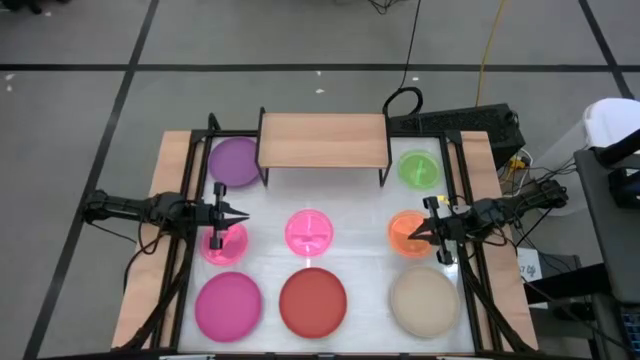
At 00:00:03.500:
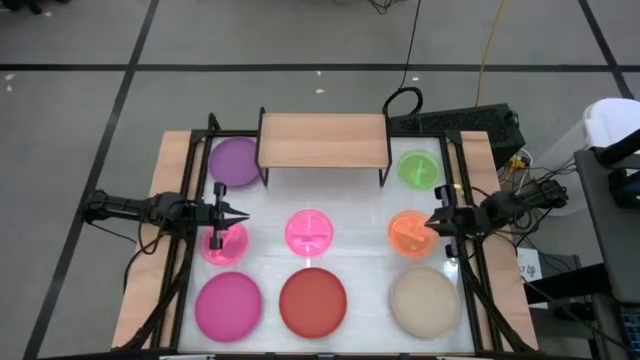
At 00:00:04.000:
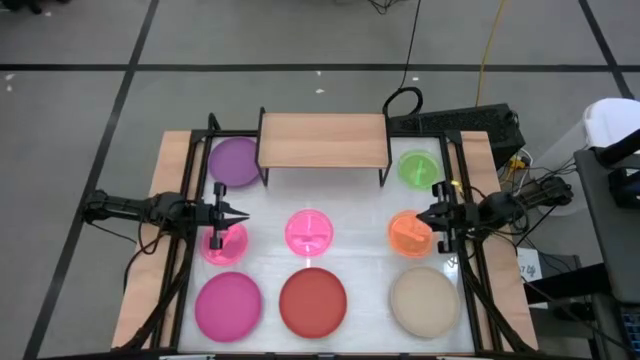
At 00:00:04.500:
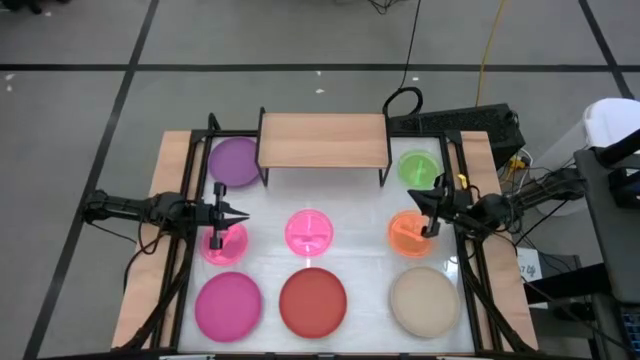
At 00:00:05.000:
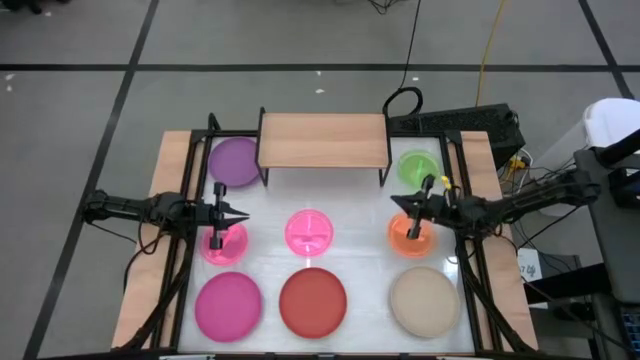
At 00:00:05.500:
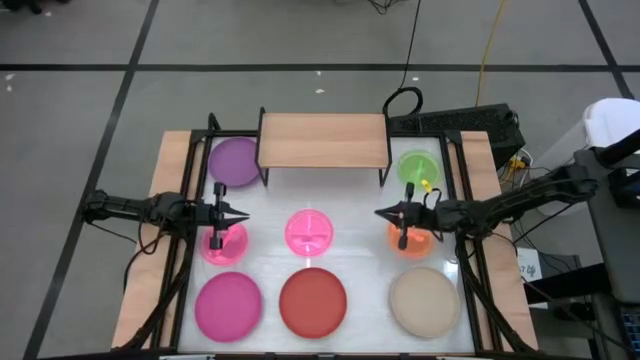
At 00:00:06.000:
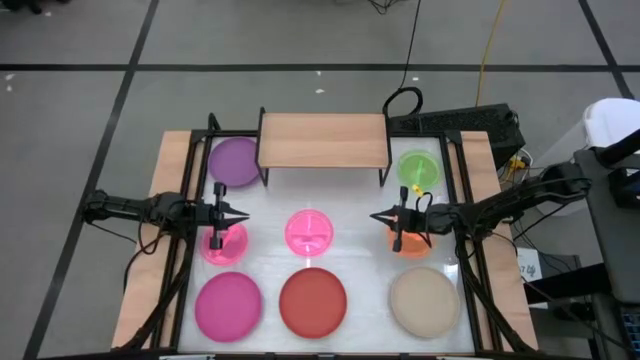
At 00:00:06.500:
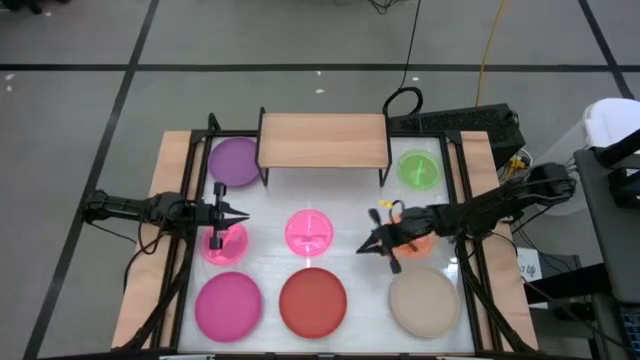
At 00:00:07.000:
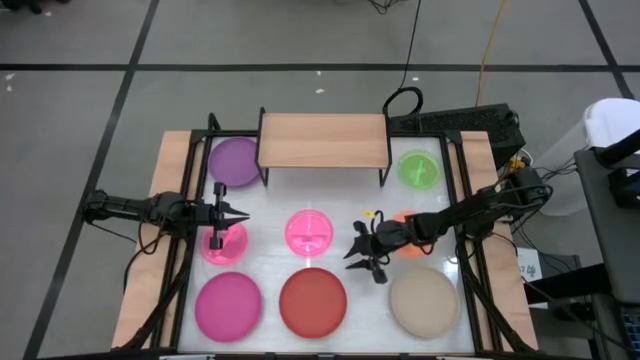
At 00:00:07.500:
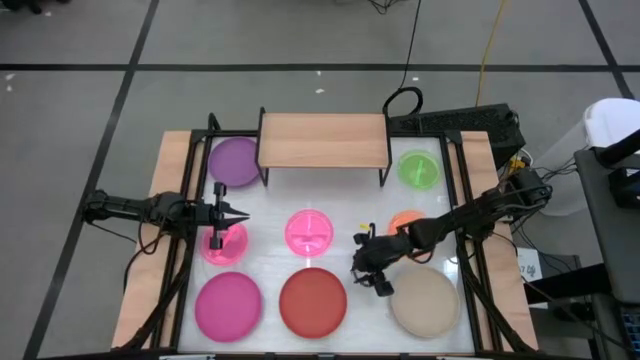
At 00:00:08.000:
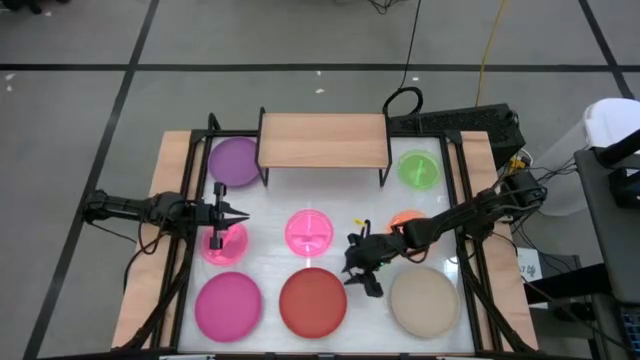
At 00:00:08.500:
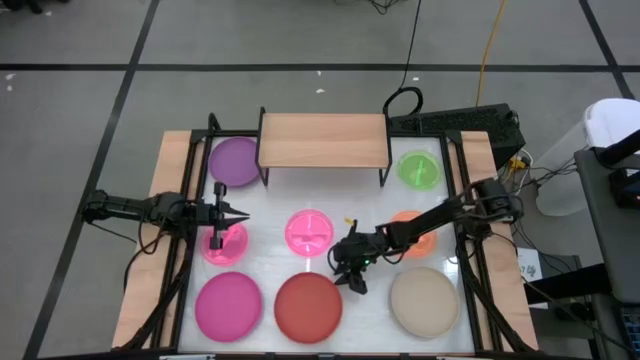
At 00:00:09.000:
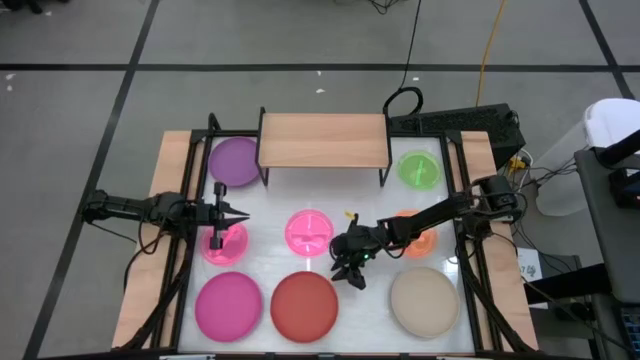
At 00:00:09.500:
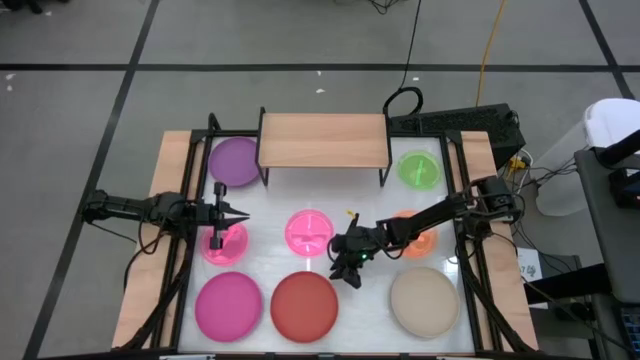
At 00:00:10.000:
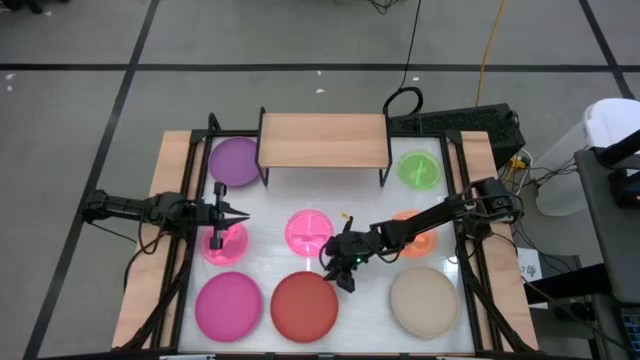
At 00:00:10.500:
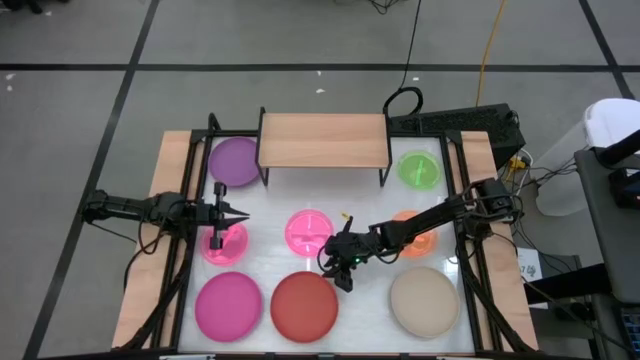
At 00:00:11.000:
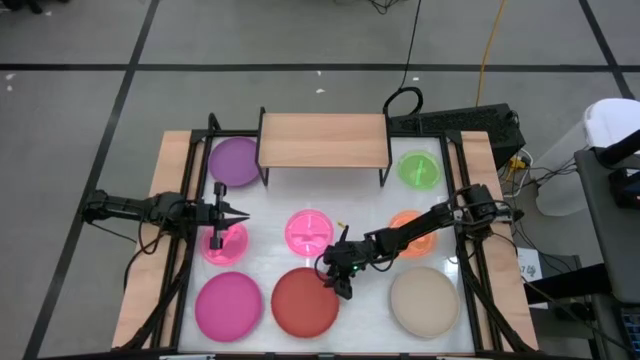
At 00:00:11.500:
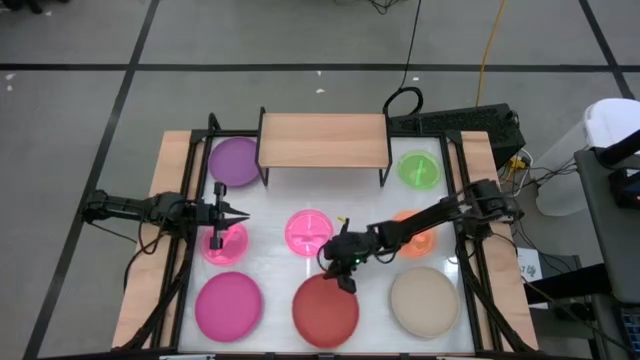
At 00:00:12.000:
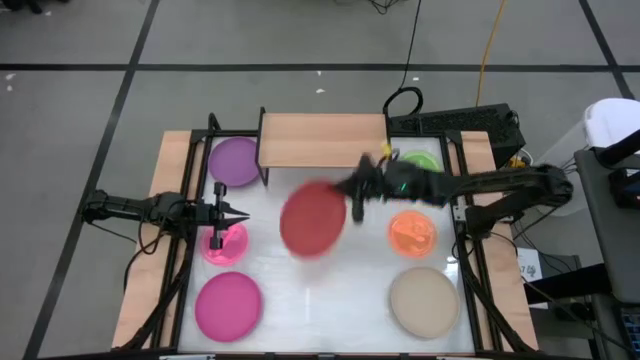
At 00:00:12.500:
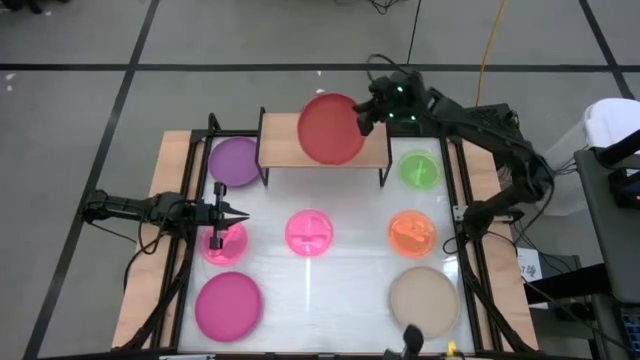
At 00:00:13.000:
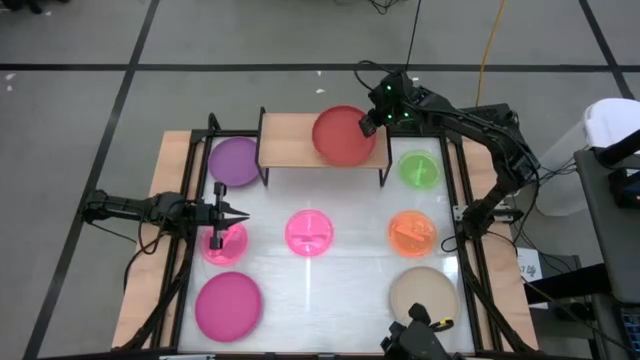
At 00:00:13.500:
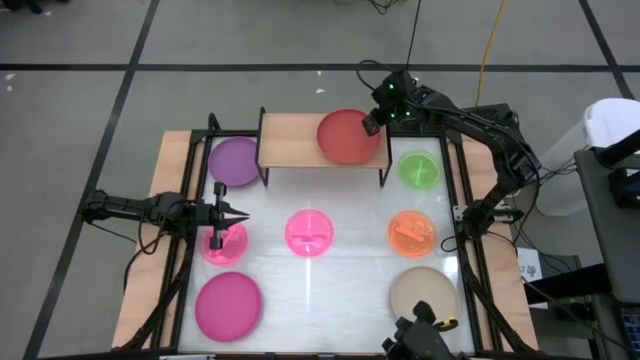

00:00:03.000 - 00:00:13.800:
Task: Place and stack plates onto a shelf
Put the orange plate on the shelf

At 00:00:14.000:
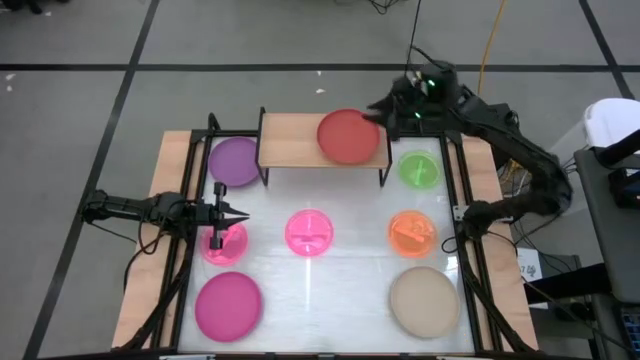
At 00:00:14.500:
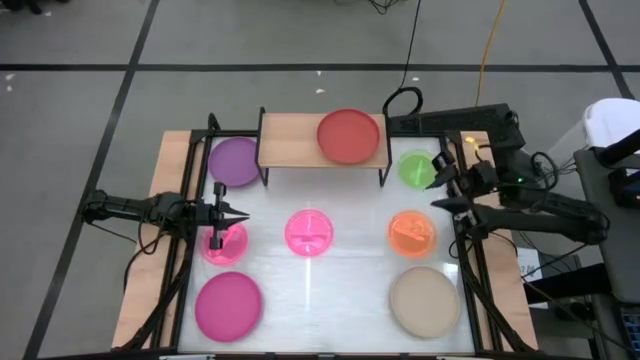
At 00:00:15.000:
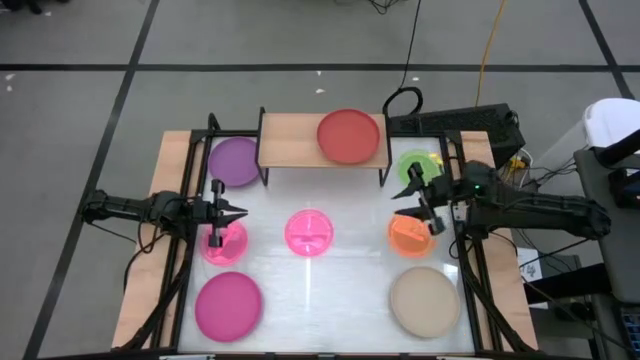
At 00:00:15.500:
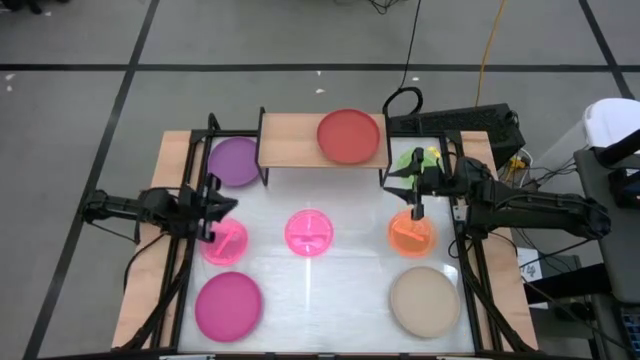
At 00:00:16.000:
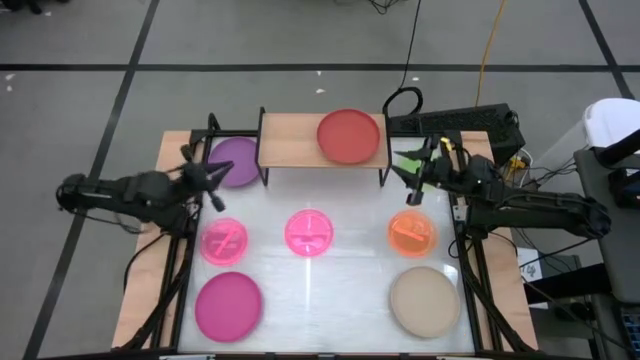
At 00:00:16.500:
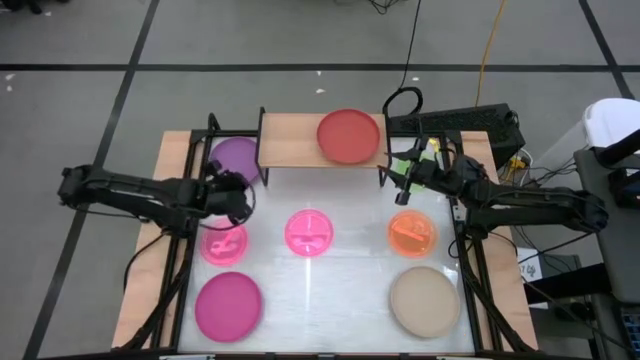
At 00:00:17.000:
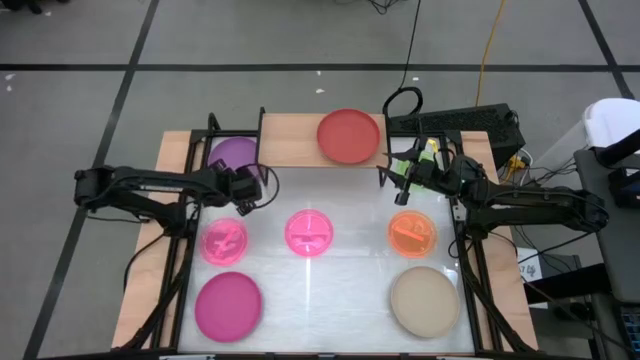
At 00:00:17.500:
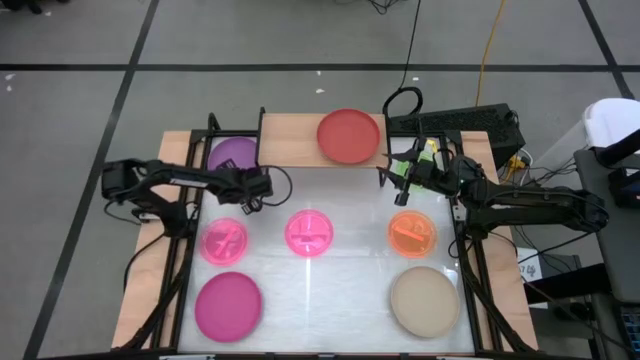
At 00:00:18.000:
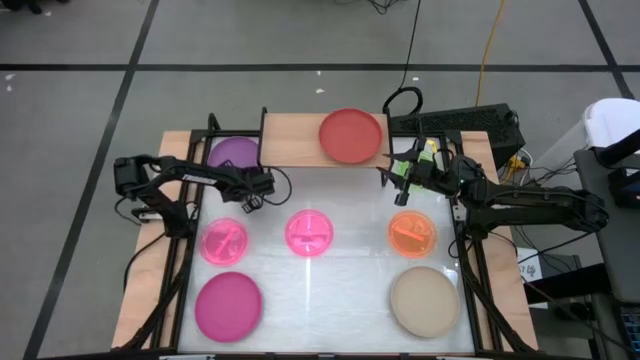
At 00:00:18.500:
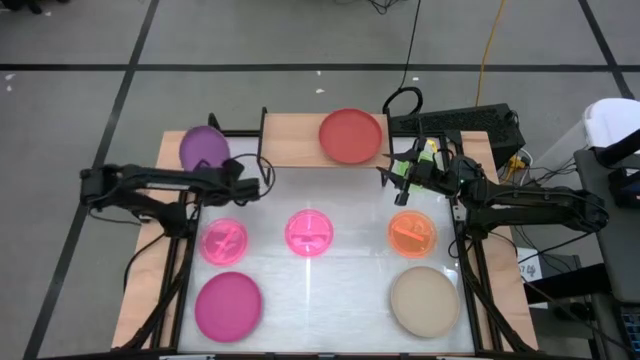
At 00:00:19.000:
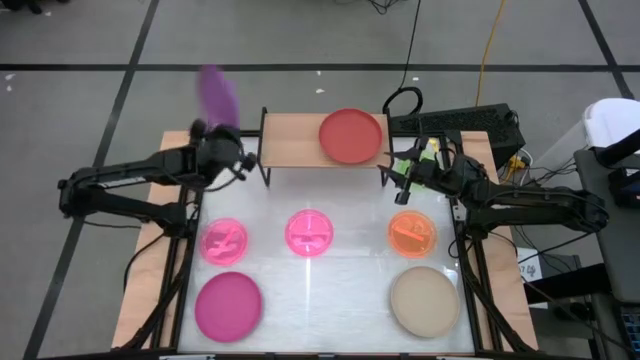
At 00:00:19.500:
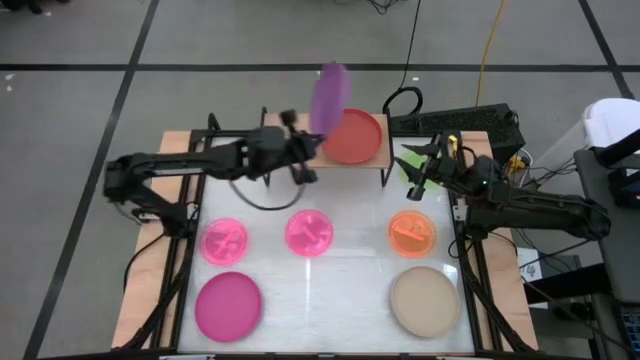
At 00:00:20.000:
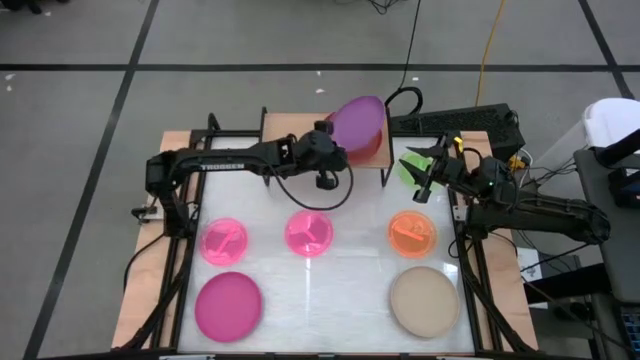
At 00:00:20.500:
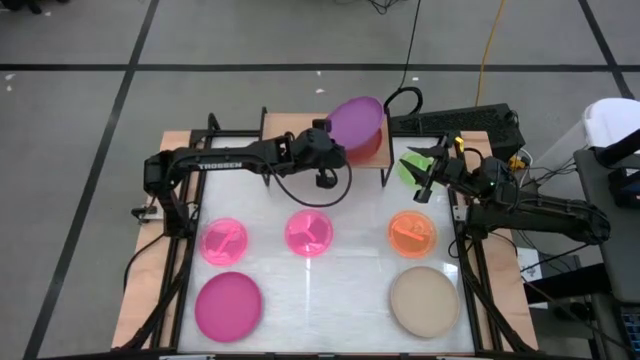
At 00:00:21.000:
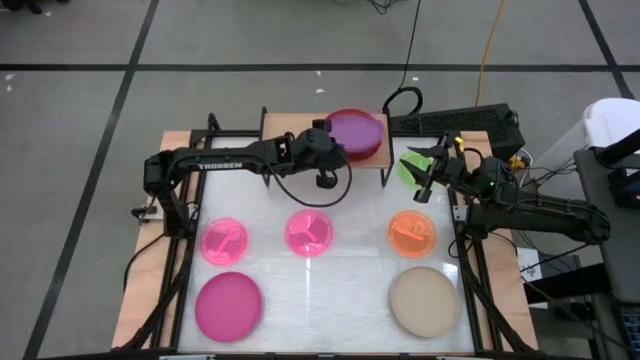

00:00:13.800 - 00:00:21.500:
Stack the violet plate on top of the orange plate on the shelf

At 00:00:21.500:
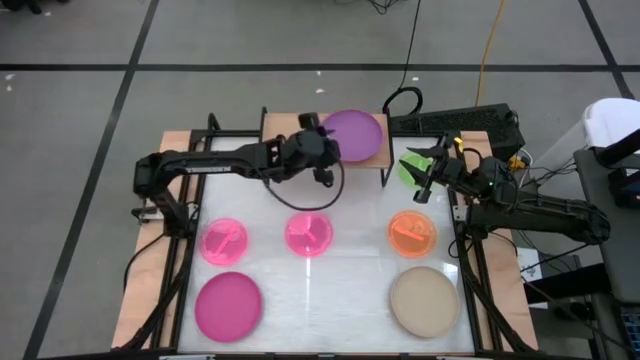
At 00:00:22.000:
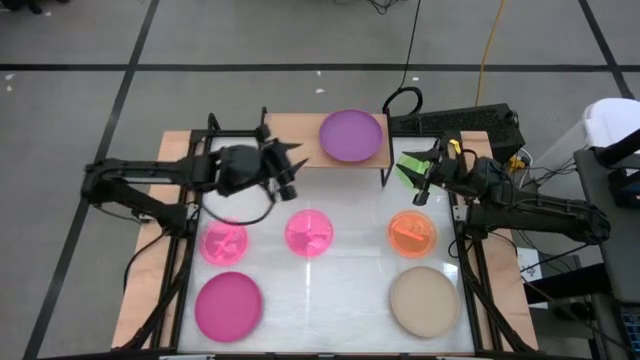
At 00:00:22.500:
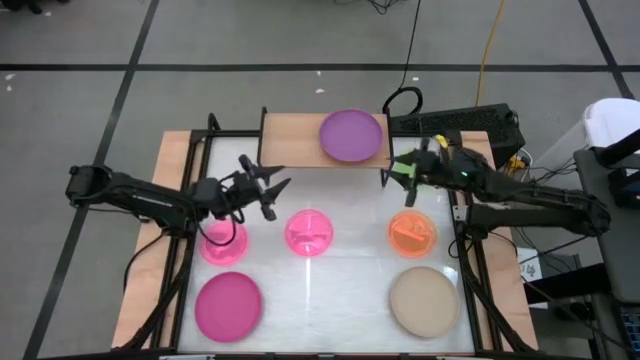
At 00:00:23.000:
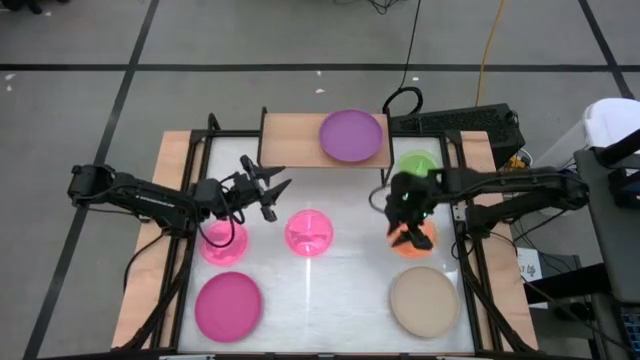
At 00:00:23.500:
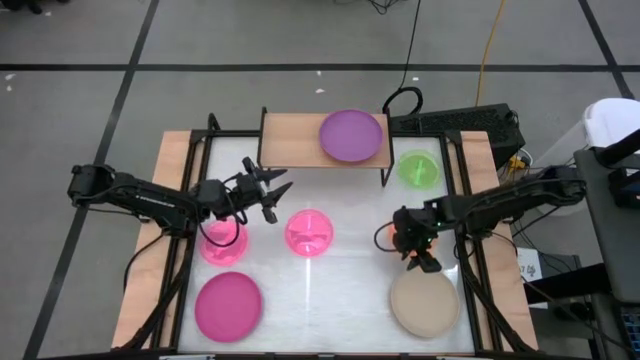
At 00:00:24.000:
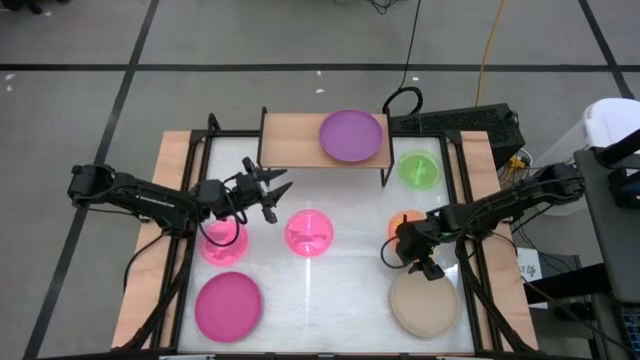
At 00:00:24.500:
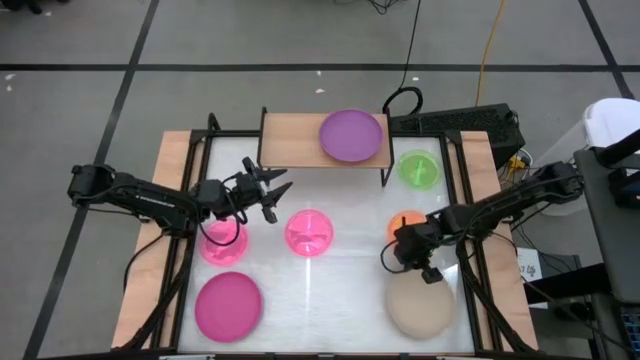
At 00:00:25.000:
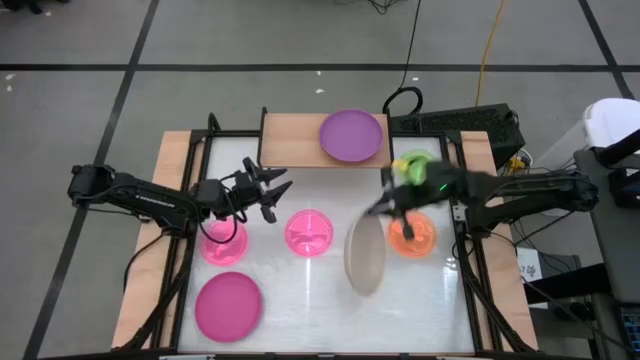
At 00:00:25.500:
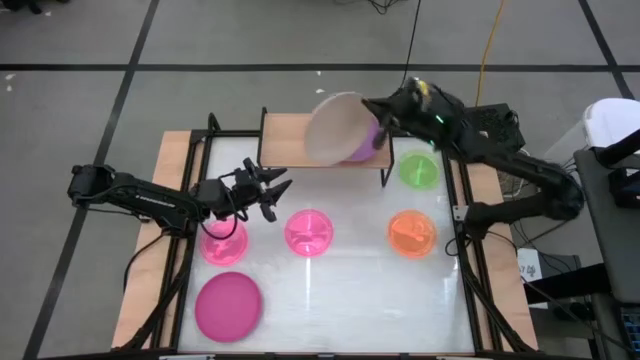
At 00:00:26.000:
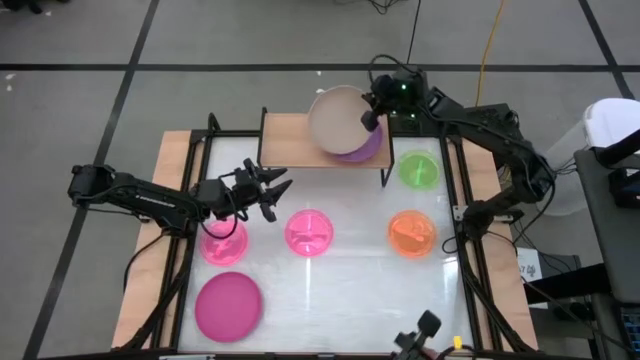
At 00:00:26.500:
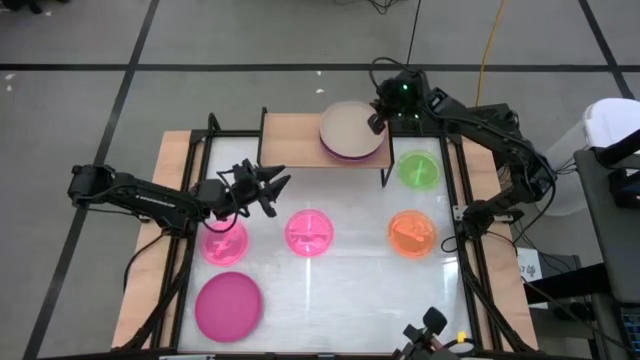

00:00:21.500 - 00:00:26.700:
Stack the light brown plate on top of the violet plate on the shelf
